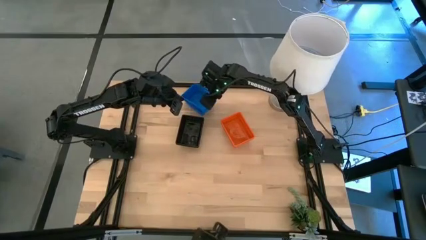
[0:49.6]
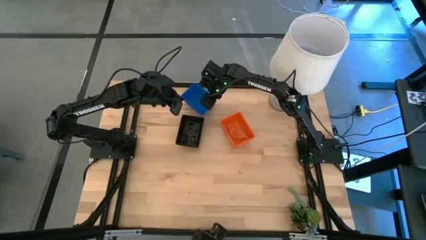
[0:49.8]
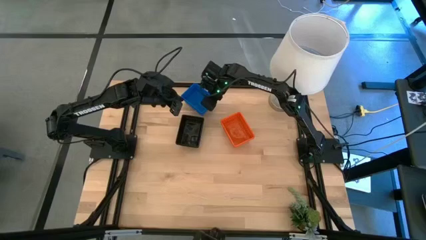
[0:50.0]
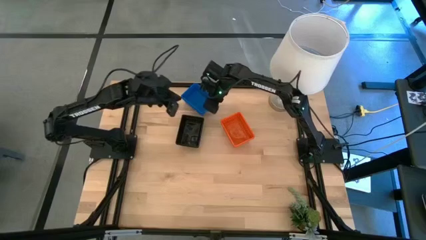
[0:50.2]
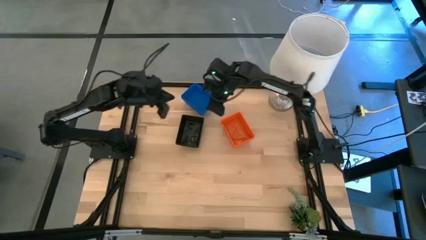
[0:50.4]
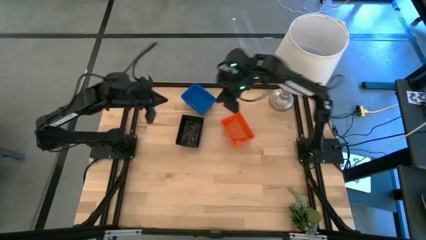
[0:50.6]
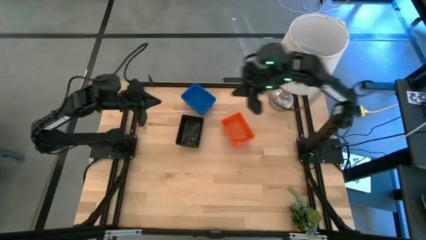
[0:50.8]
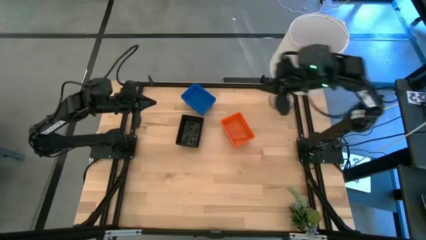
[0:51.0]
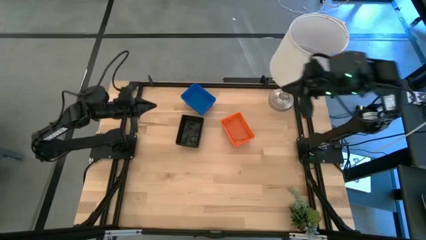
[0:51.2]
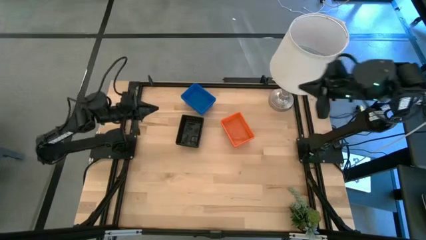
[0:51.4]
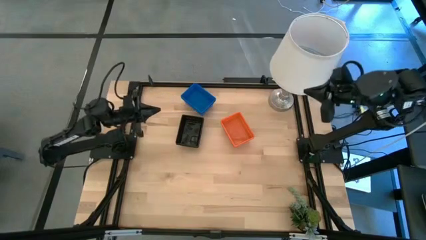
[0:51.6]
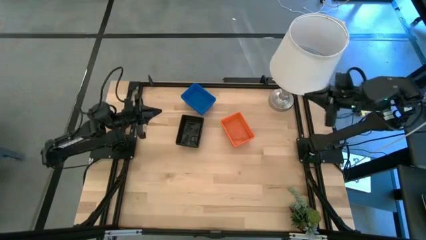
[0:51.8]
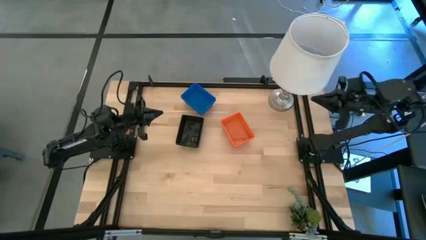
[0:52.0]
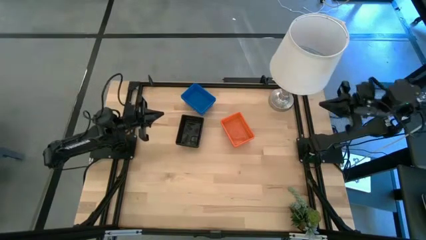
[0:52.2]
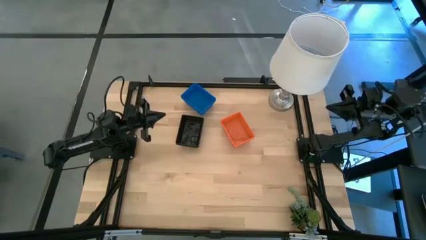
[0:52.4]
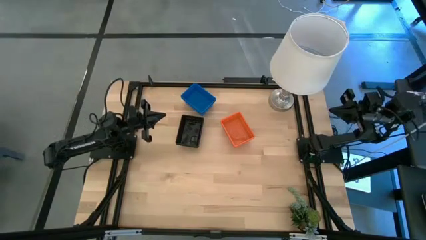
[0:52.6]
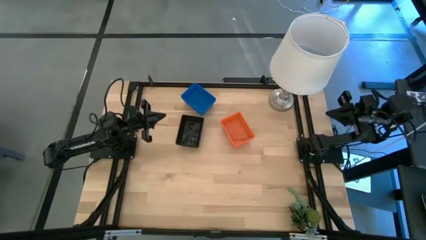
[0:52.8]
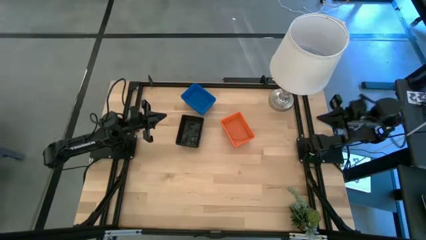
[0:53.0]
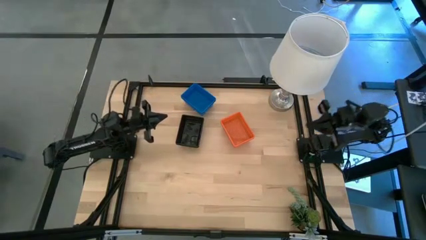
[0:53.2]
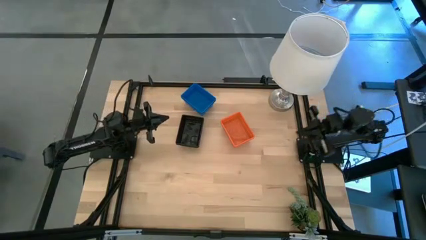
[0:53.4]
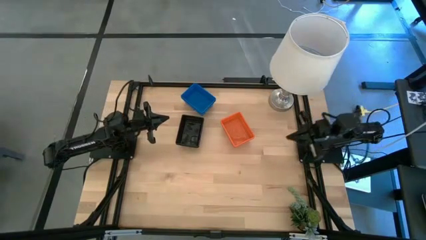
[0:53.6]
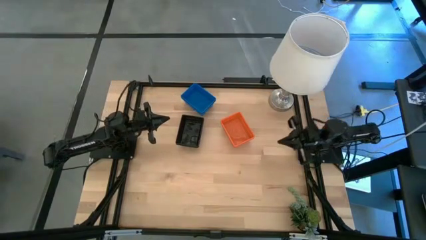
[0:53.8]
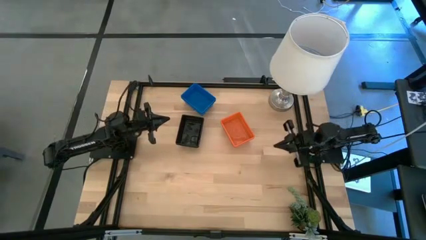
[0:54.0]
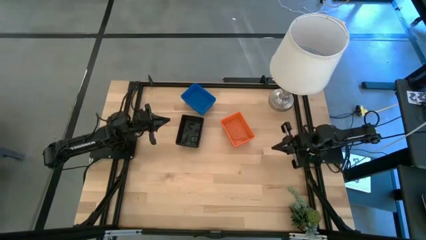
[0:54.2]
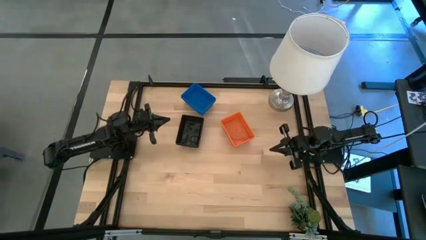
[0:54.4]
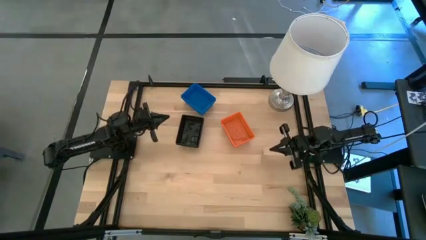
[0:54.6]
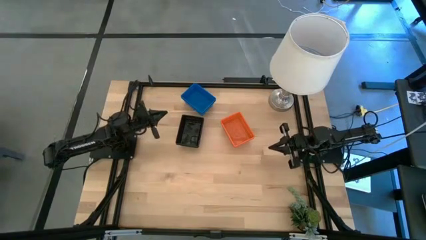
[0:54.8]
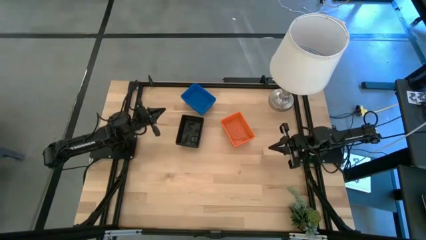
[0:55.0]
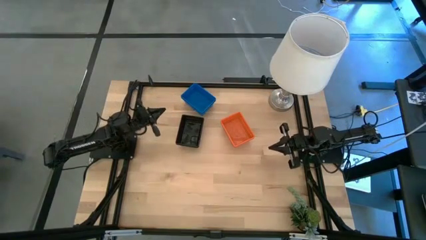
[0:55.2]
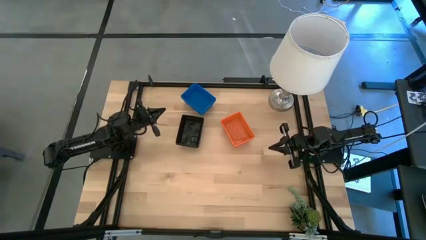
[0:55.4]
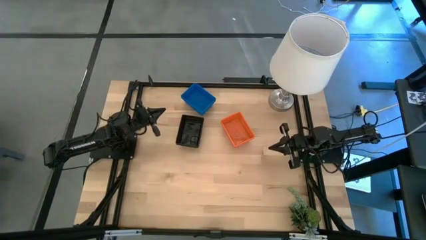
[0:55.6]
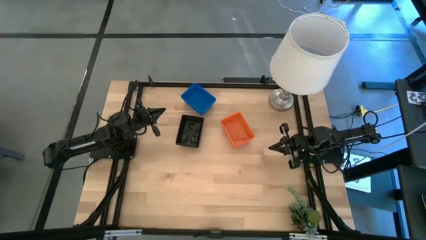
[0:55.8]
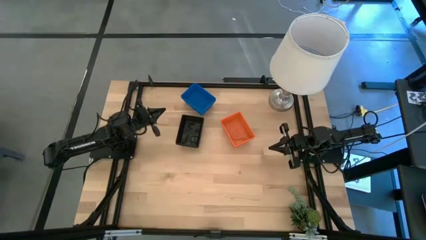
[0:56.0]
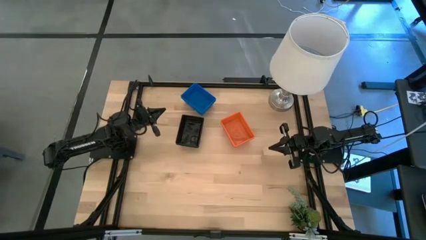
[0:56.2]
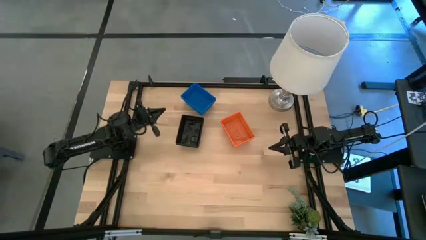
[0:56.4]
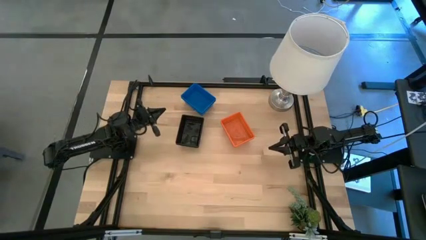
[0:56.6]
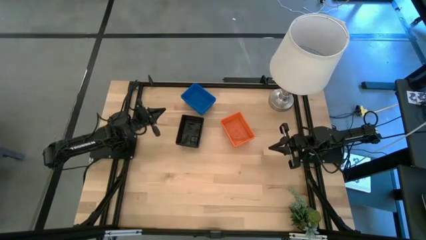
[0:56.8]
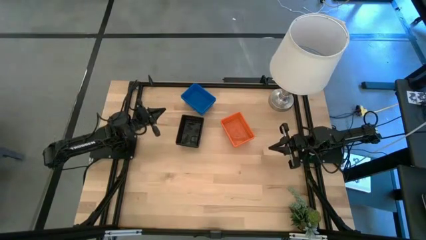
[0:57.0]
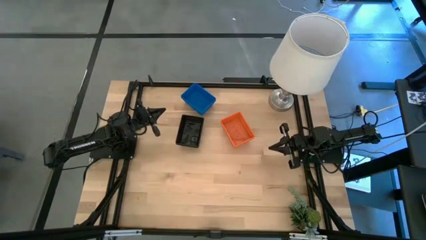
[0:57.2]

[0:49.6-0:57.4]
Return to Home Position

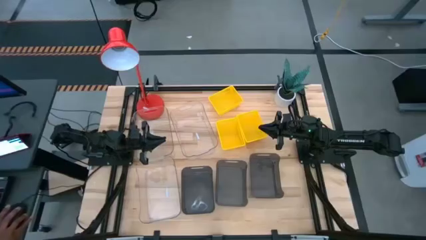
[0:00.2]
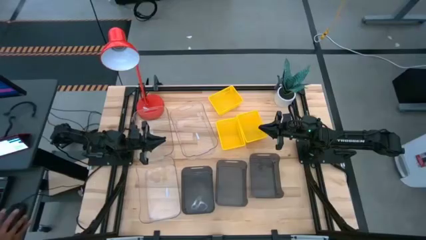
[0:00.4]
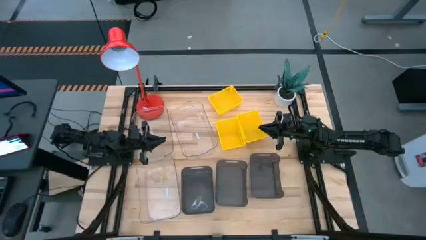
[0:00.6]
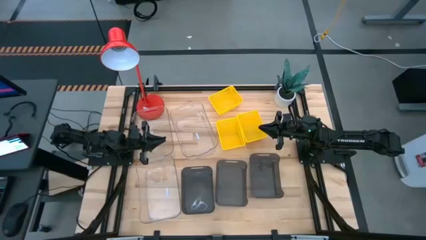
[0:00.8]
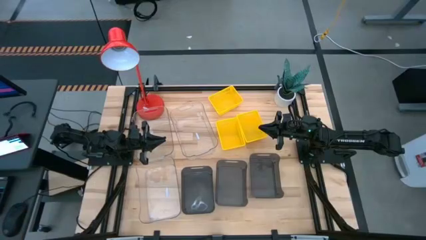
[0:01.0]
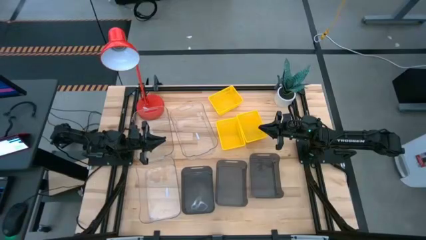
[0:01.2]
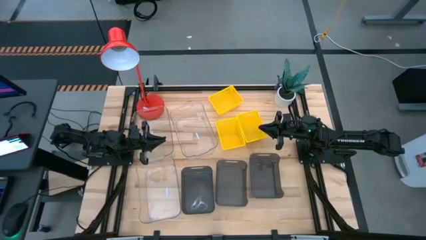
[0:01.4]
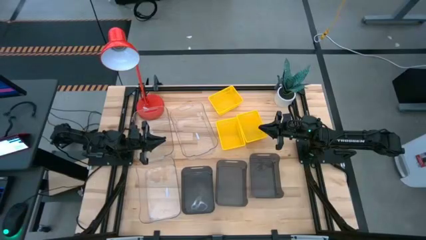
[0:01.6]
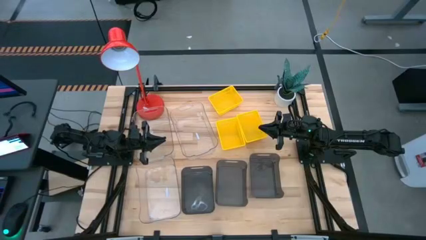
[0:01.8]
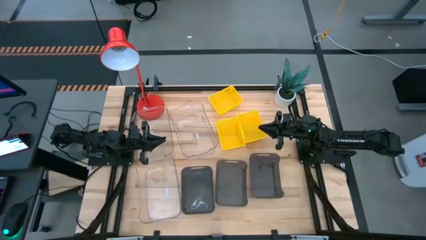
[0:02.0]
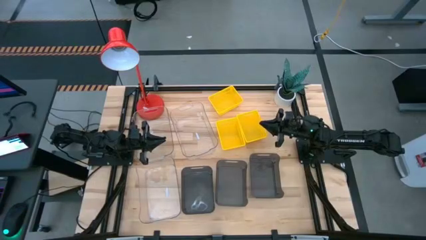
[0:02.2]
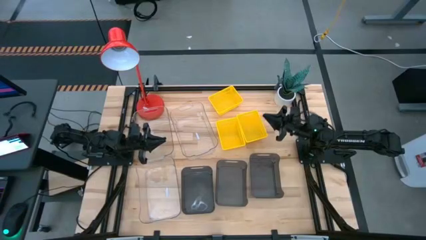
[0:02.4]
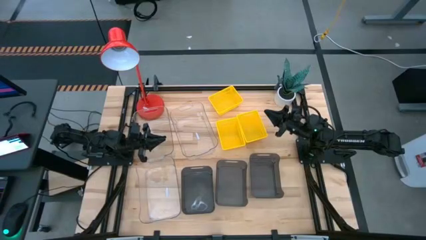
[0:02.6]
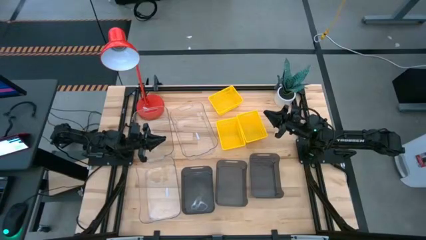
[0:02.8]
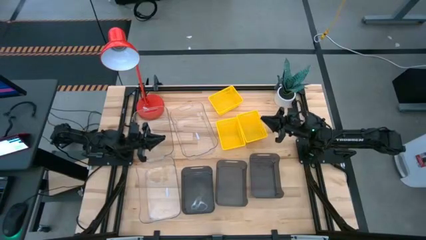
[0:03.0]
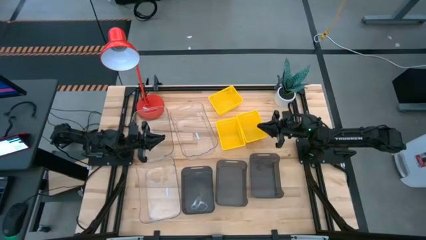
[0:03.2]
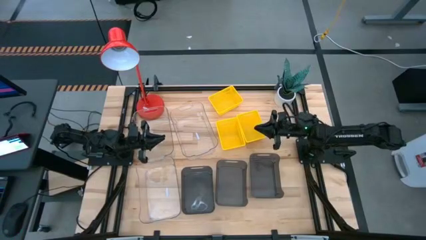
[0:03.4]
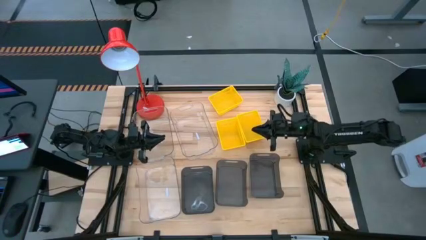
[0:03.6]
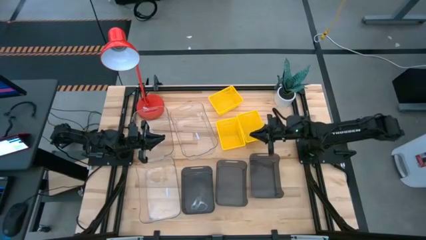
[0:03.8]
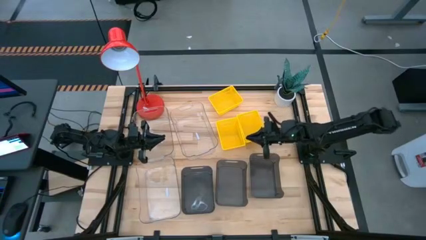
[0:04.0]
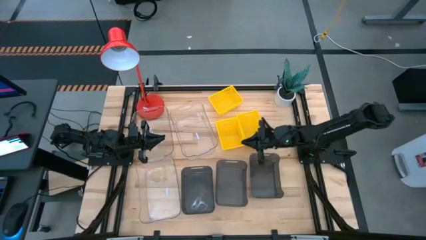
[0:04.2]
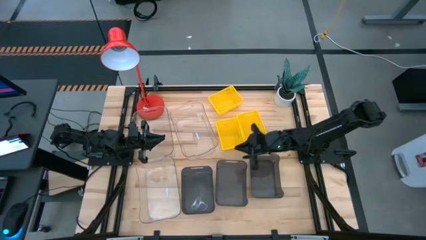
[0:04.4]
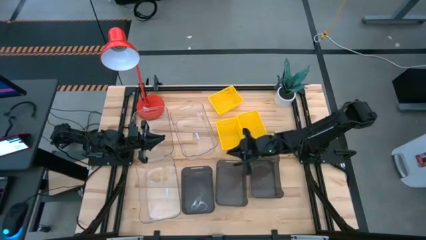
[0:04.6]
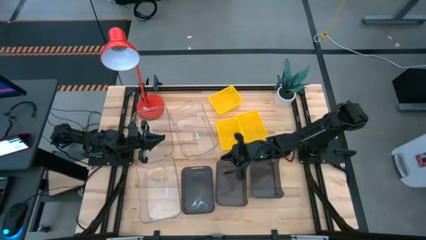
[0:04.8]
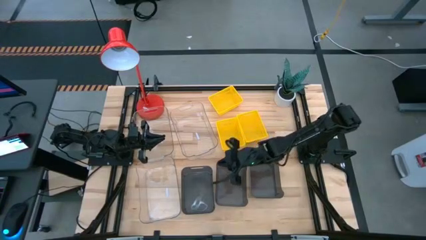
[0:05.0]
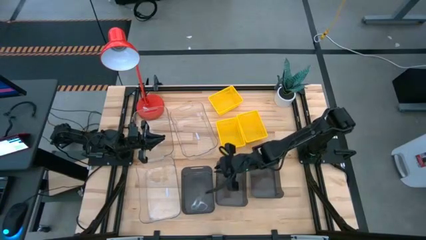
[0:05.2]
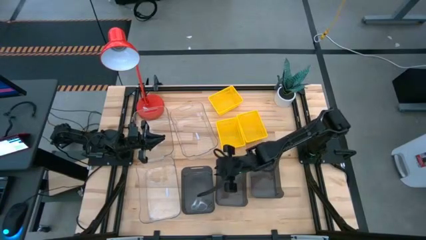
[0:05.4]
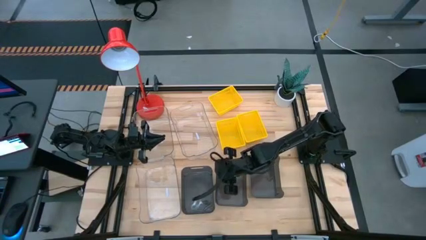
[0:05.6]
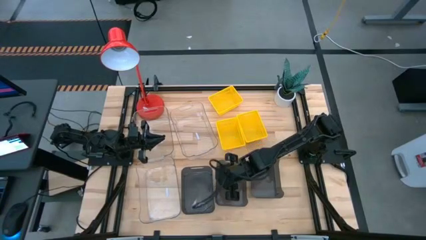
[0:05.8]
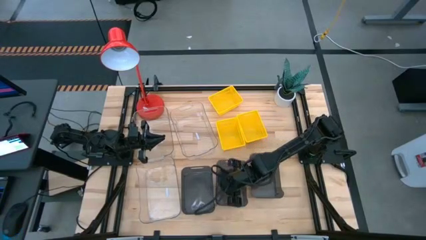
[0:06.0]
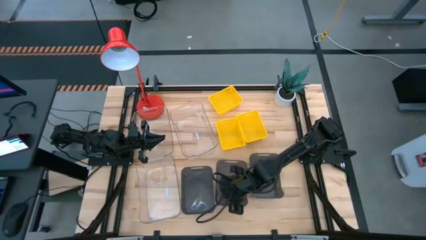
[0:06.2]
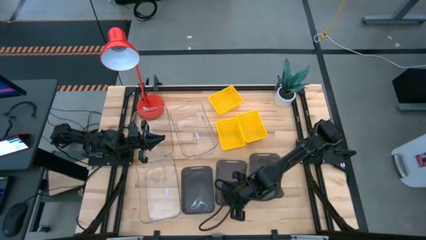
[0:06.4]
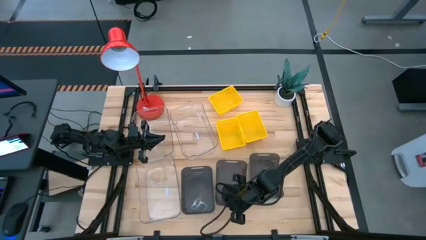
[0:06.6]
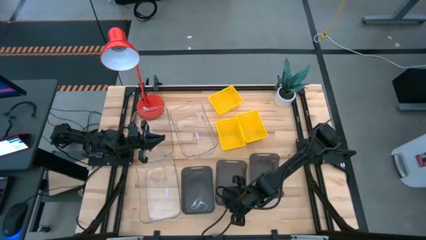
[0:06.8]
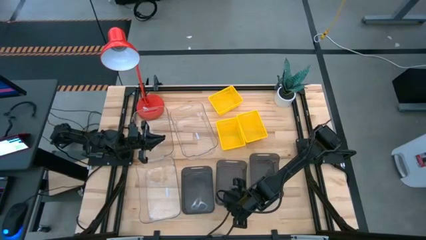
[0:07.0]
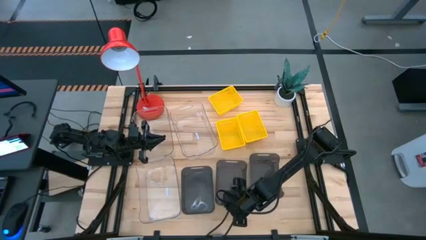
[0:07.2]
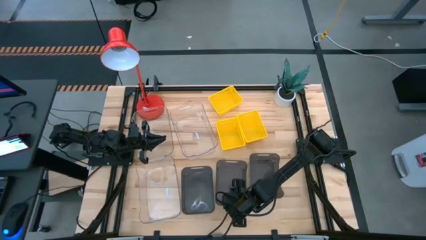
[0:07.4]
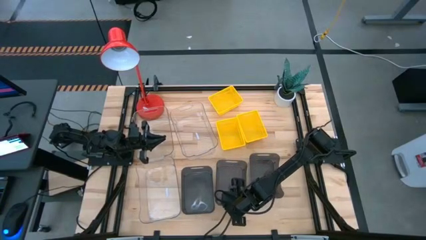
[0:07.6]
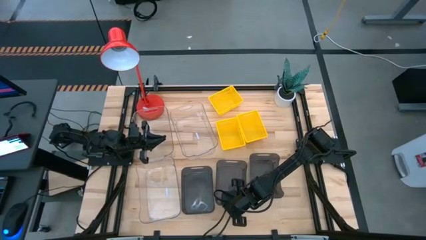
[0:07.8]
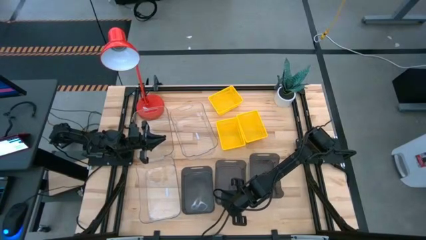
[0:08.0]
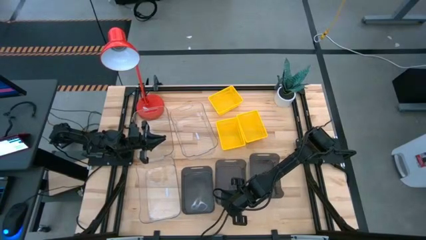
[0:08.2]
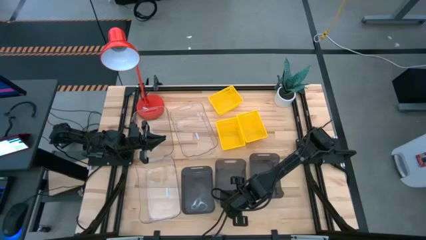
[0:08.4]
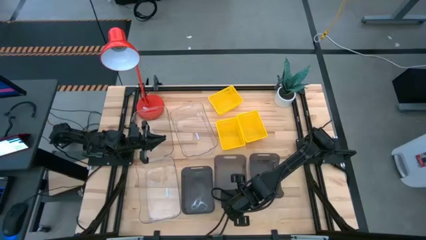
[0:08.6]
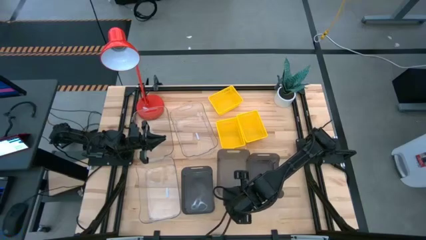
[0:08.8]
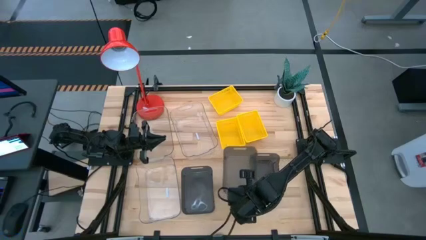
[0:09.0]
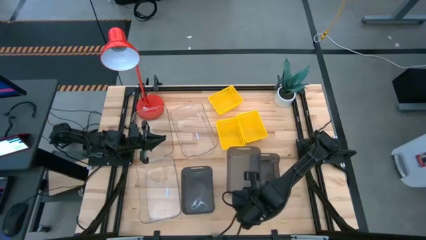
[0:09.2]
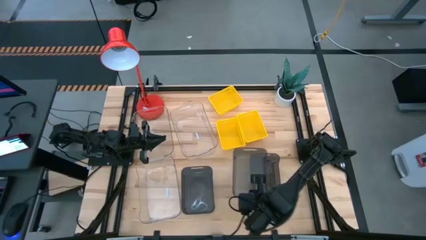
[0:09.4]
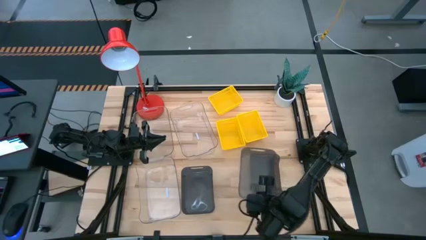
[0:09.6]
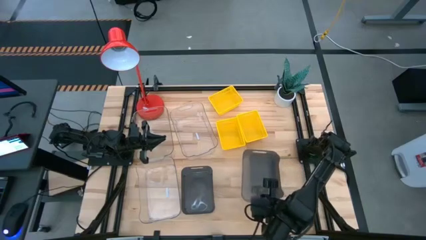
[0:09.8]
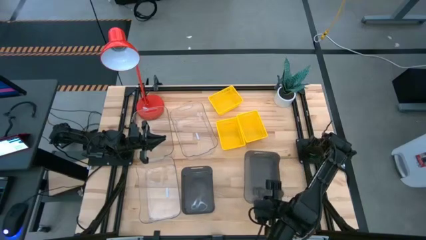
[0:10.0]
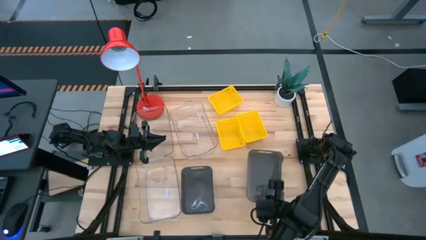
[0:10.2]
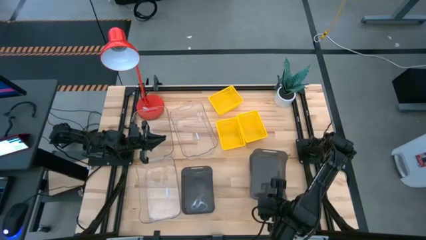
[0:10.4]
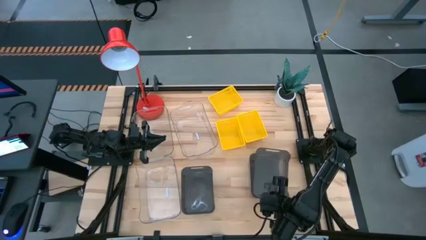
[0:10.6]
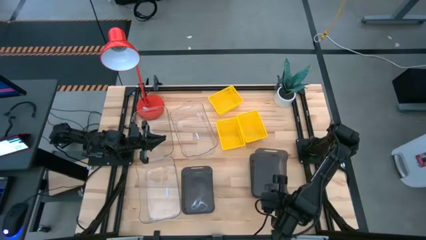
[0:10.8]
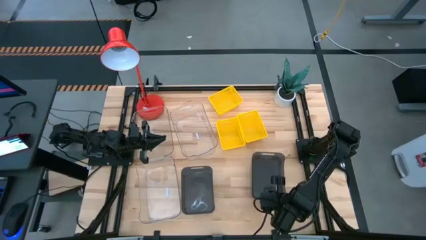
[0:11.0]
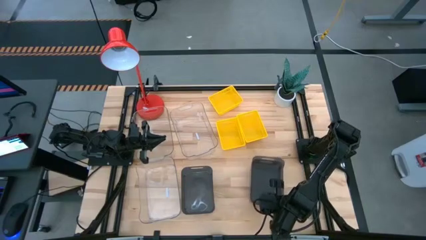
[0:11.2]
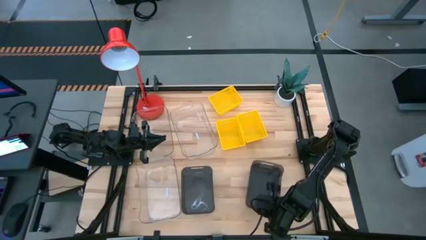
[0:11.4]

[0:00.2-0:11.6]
Stack the middle black bin on the right black bin
